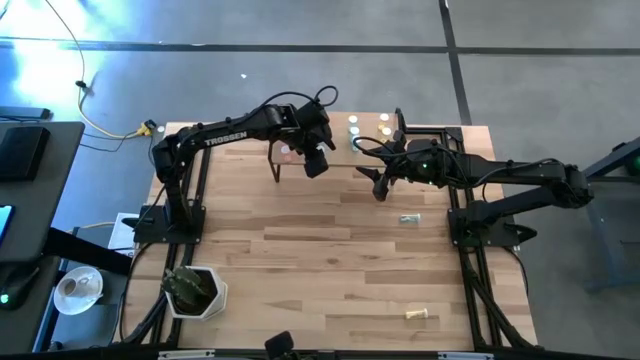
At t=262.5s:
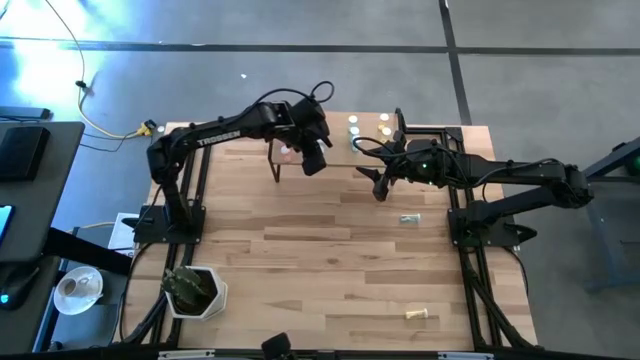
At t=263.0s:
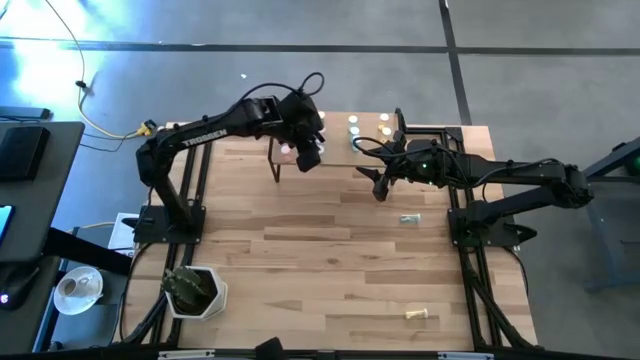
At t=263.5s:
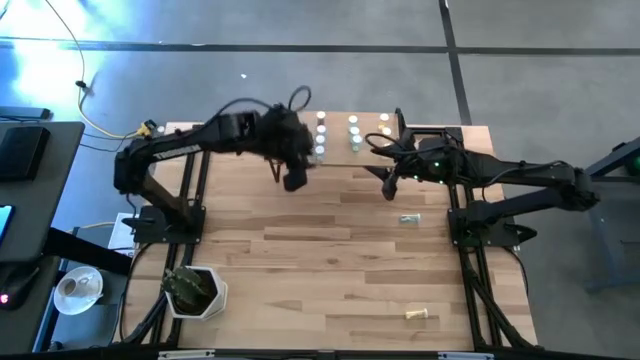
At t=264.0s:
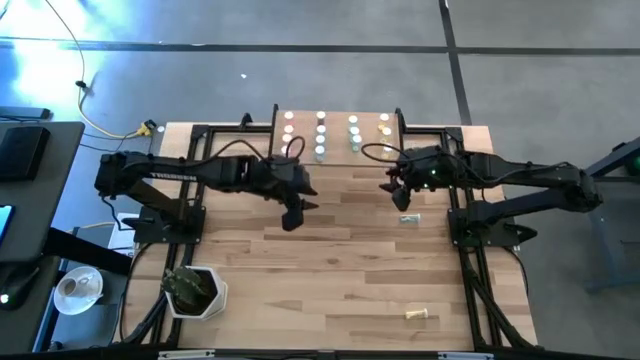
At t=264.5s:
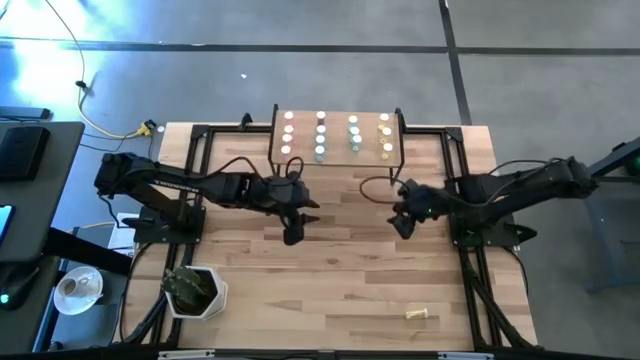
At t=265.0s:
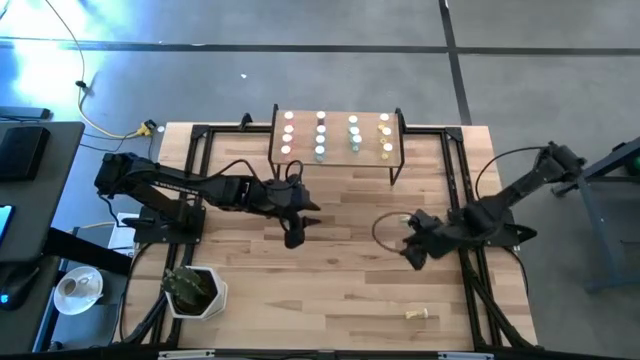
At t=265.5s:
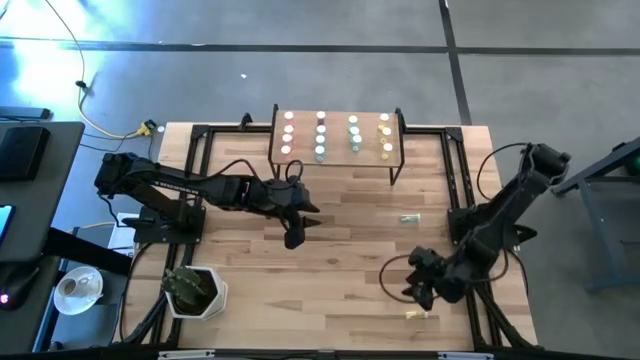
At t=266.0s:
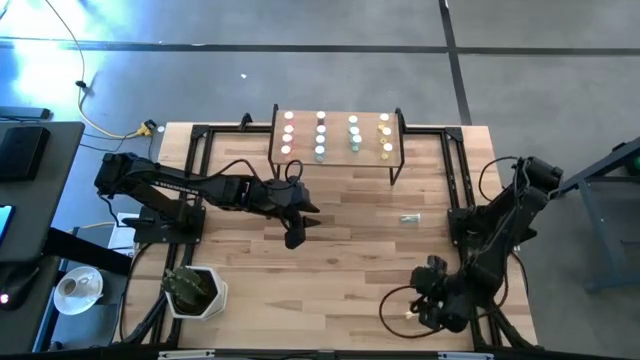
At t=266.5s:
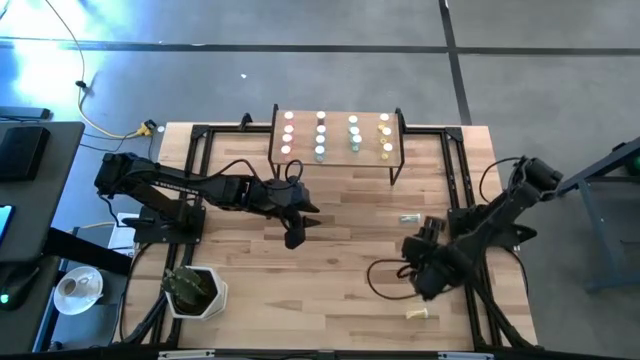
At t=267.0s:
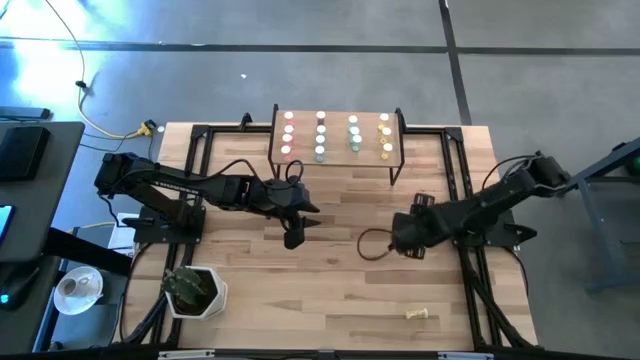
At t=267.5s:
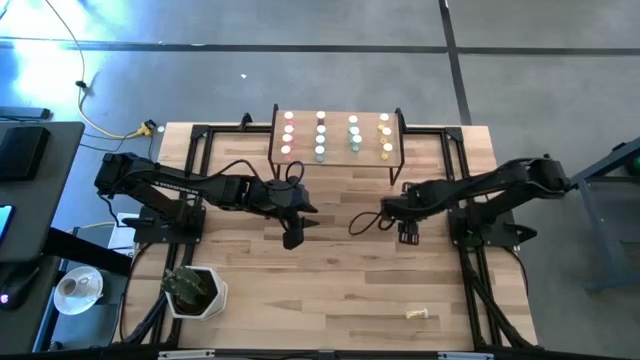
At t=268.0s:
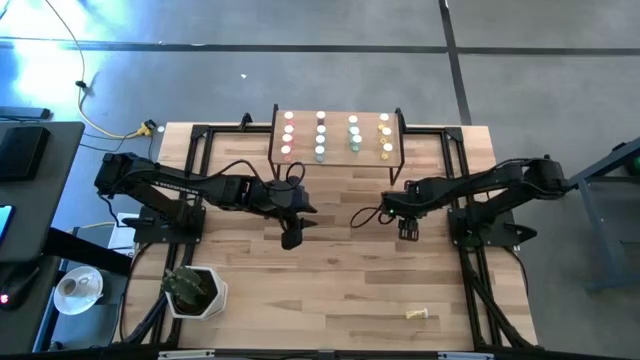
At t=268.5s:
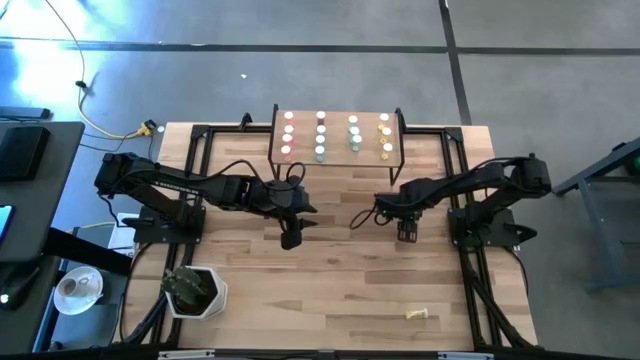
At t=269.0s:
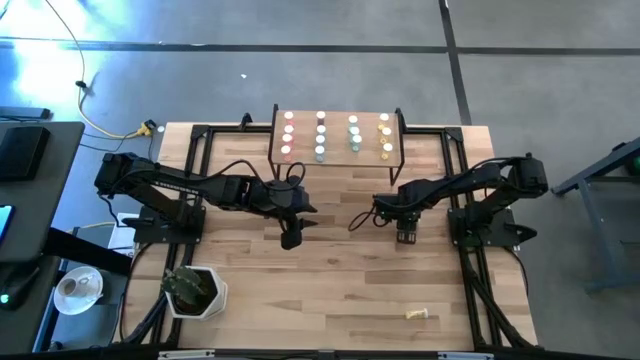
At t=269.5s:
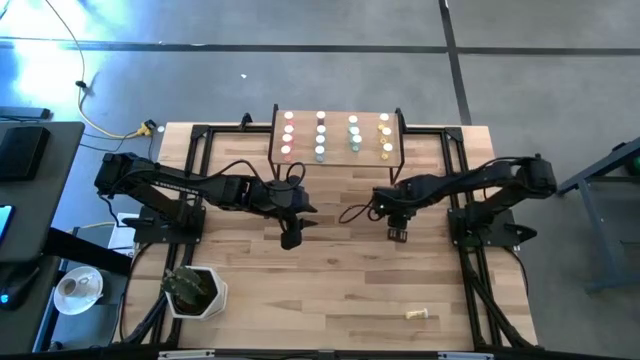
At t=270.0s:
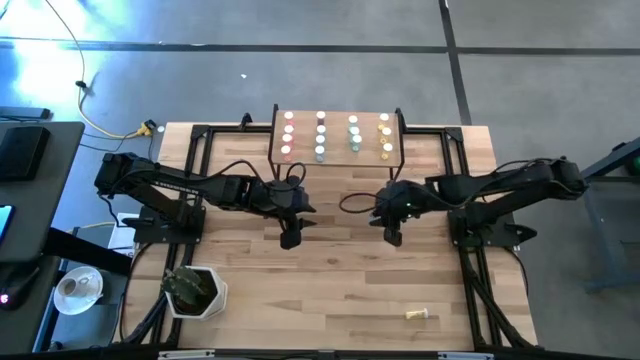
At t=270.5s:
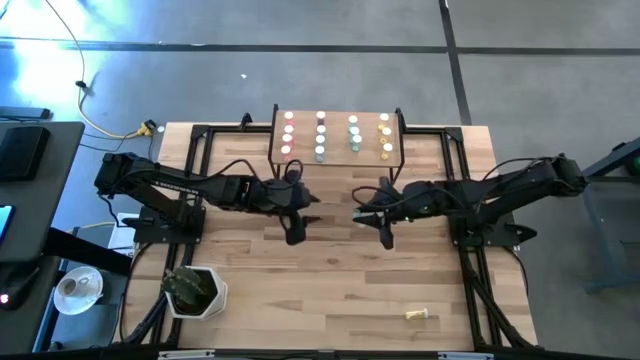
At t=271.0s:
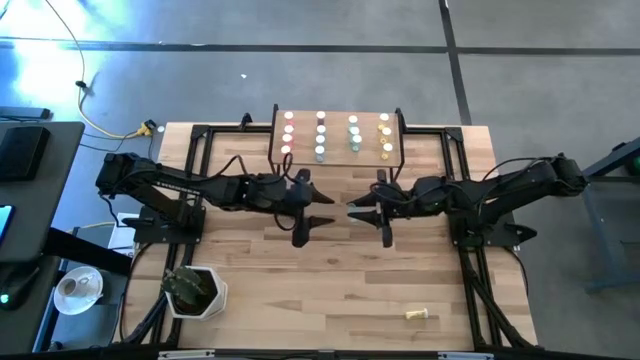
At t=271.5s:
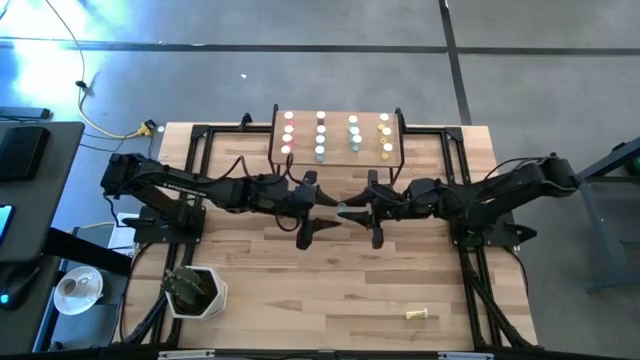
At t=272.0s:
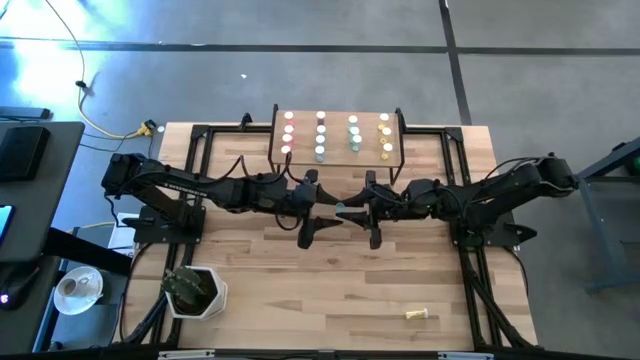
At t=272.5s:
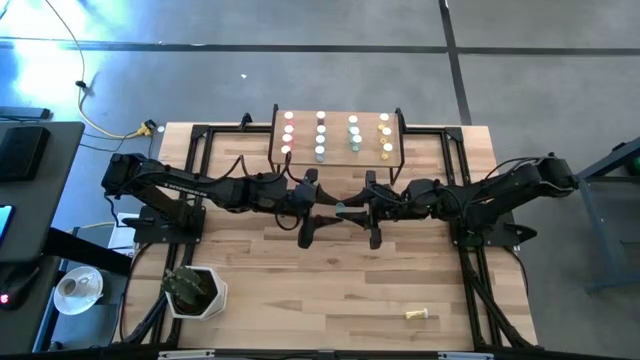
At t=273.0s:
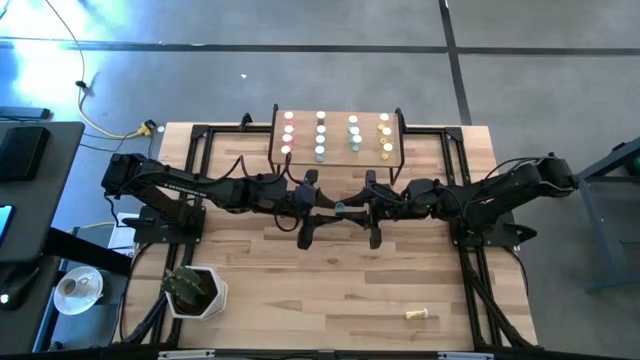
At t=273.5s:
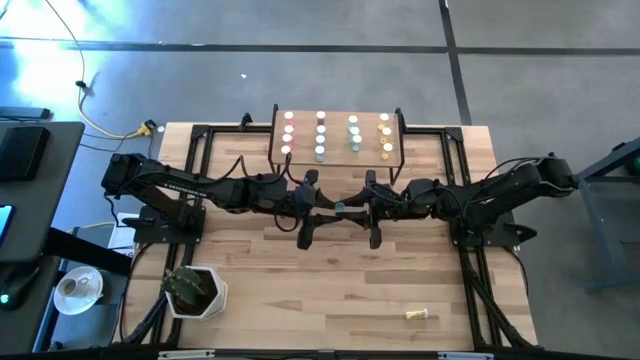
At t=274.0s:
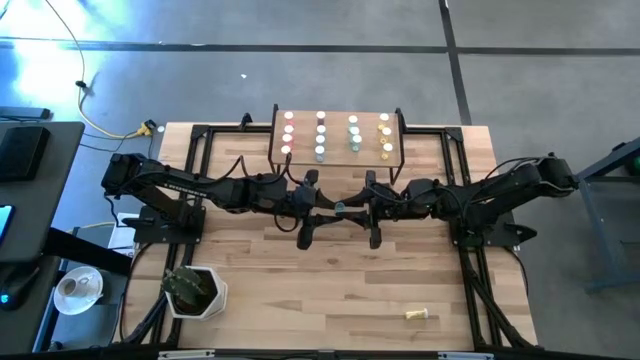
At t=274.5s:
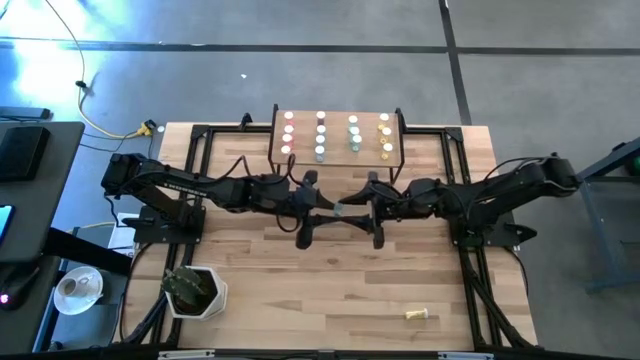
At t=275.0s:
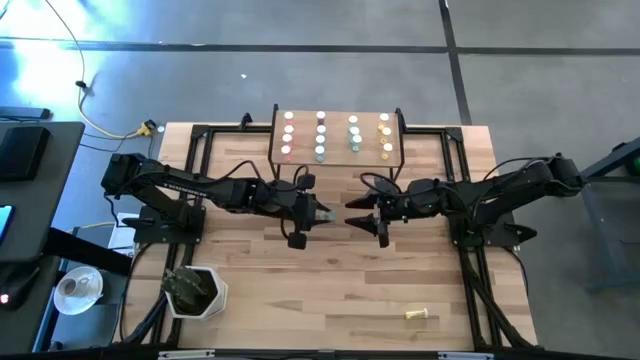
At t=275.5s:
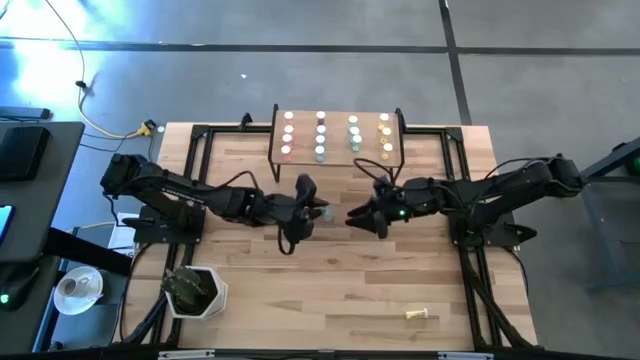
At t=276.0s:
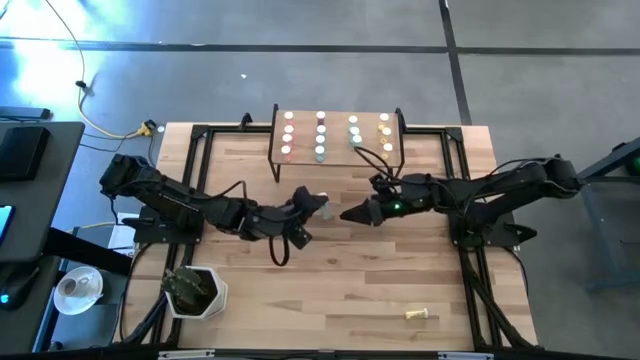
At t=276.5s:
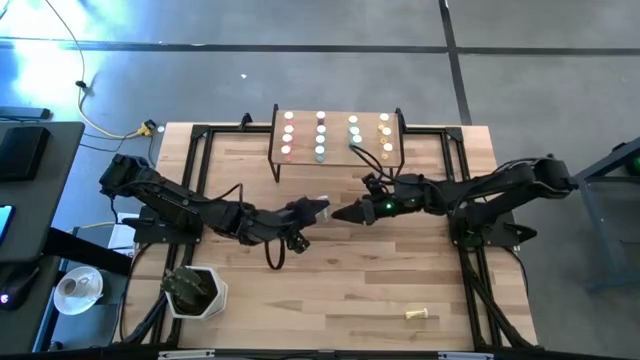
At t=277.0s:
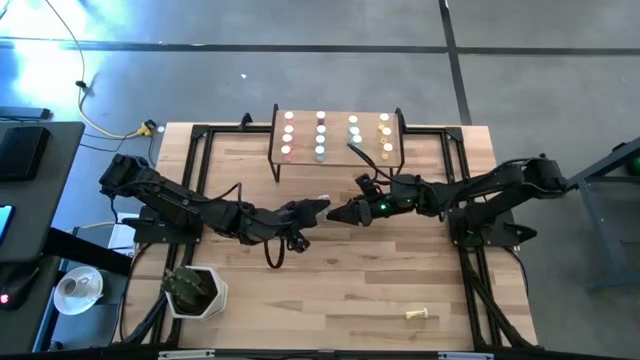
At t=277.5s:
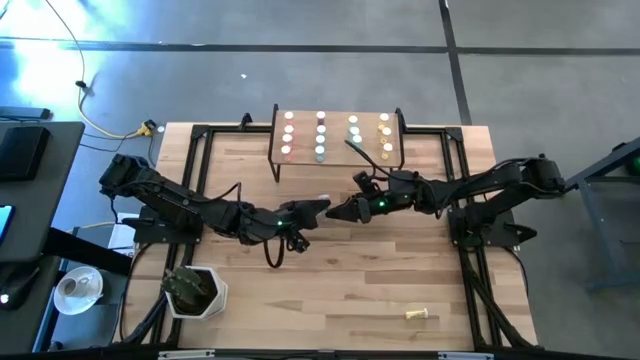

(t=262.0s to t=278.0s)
Task: Pick and place medicine bottles onto shelf by color
Put the green pill bottle on the shelf aligned with the other green pill bottles

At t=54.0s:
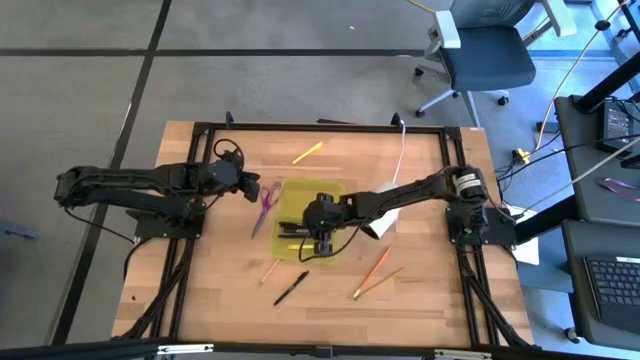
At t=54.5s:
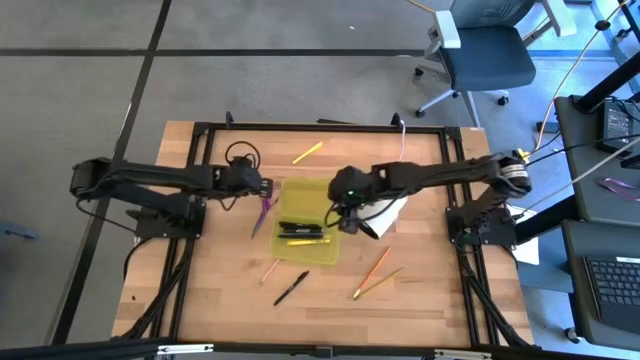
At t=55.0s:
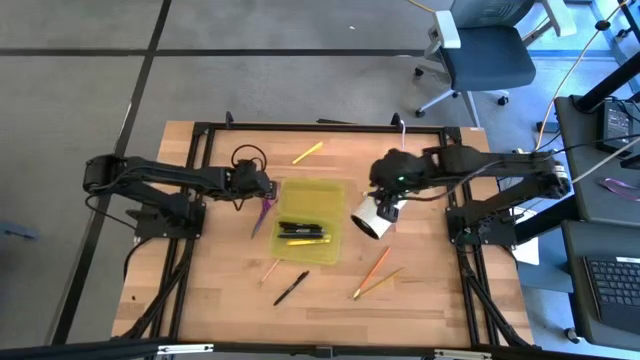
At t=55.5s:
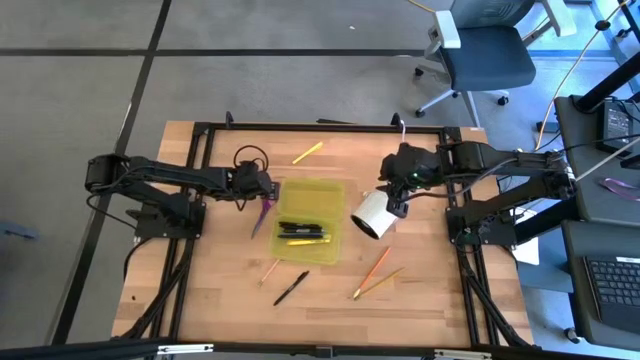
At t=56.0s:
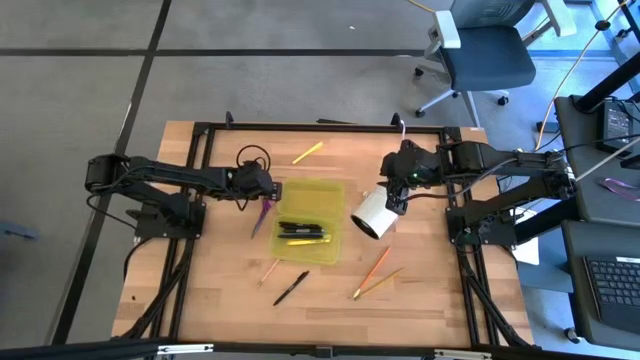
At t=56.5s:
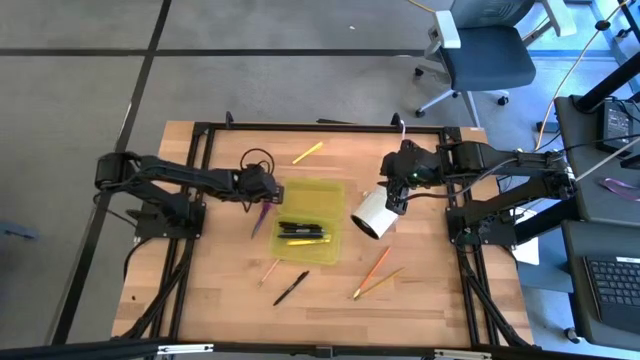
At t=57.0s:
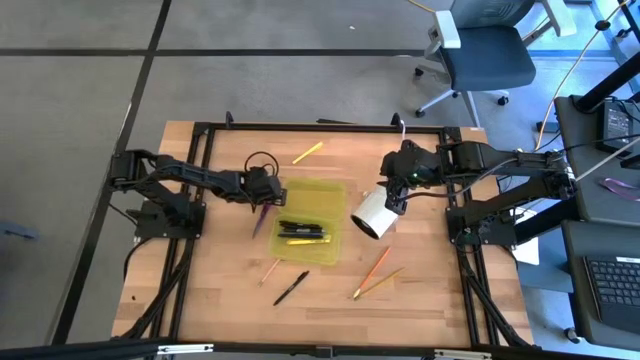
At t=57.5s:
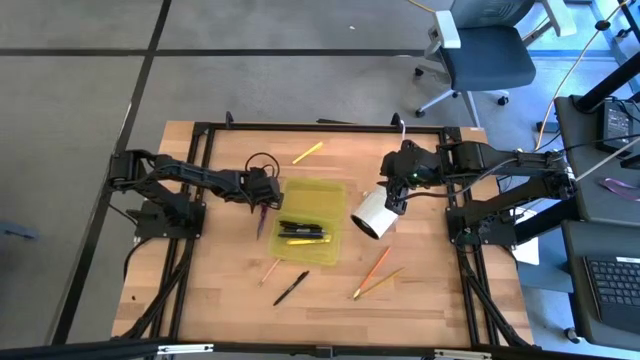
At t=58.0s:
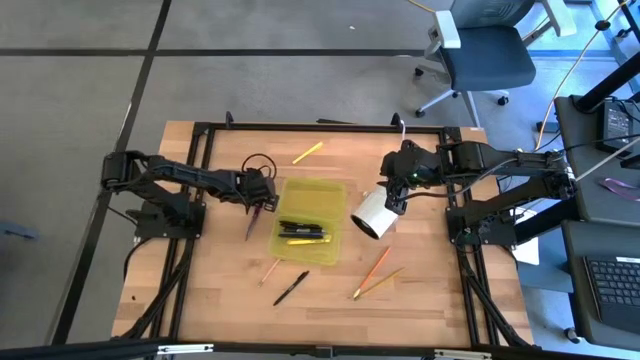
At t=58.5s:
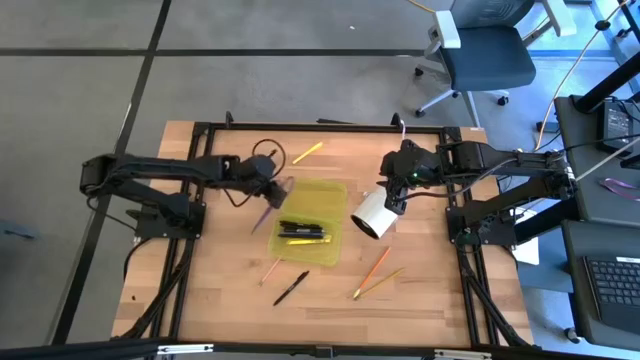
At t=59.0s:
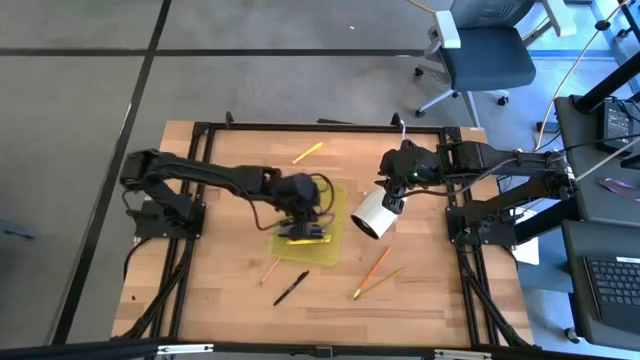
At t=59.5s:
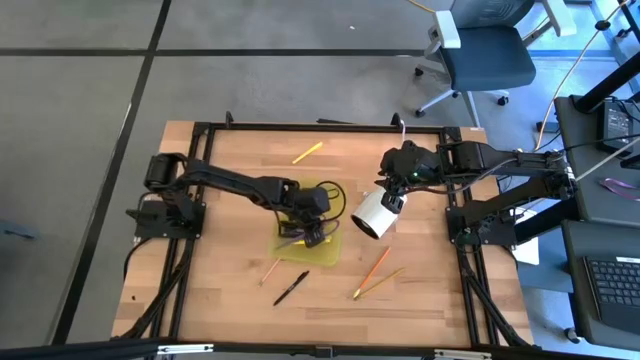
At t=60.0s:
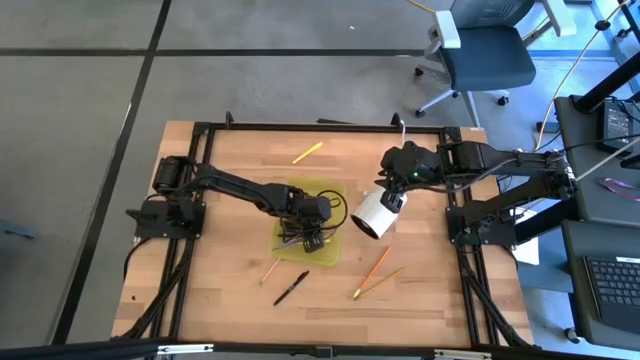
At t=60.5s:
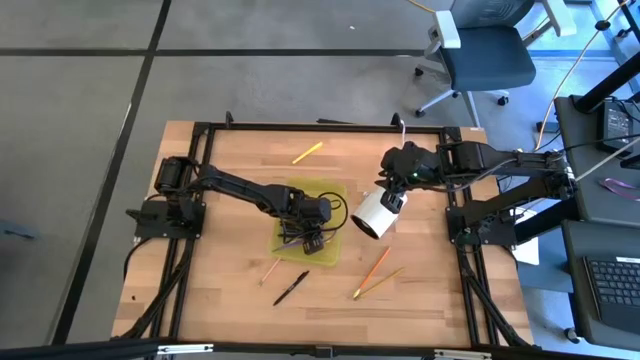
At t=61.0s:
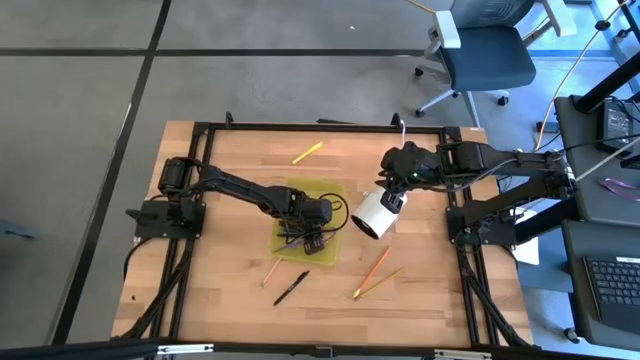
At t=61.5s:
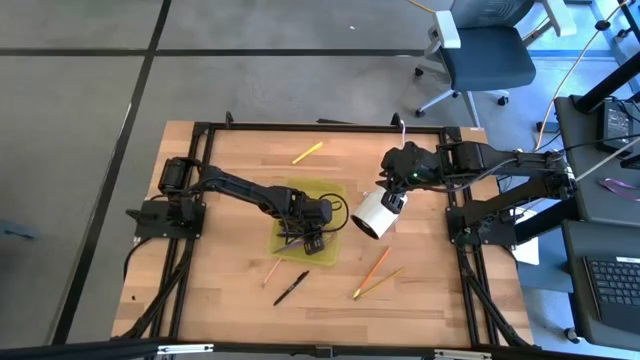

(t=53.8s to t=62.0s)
Task: Pick & place school supplies into a supply box
Put the purple scissors into the yellow supply box
